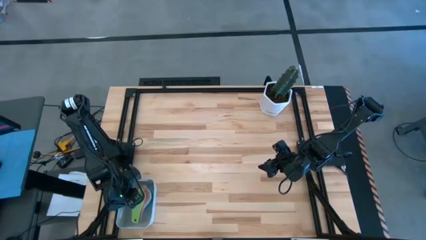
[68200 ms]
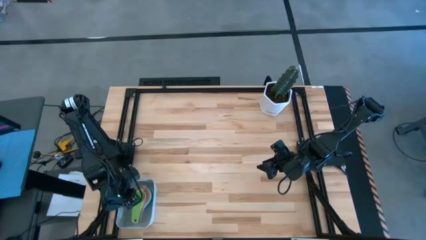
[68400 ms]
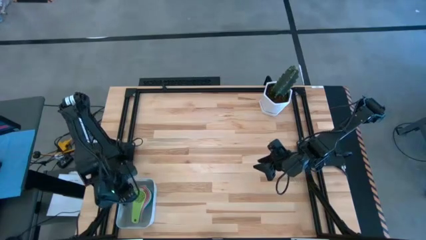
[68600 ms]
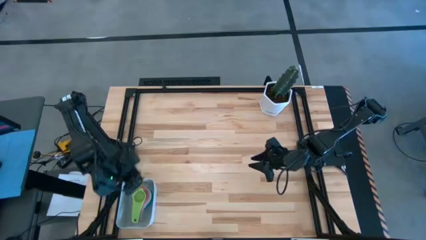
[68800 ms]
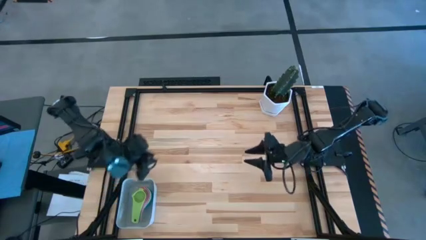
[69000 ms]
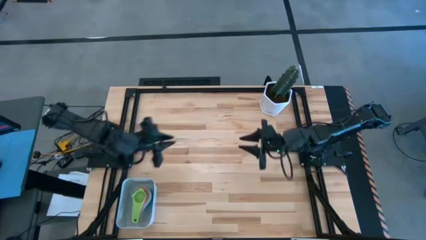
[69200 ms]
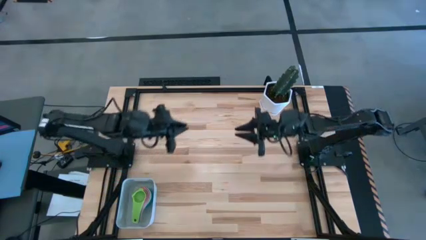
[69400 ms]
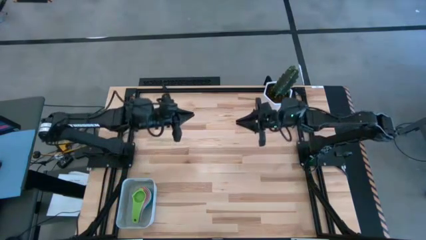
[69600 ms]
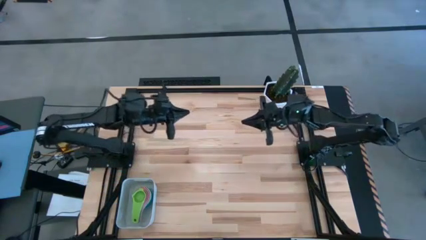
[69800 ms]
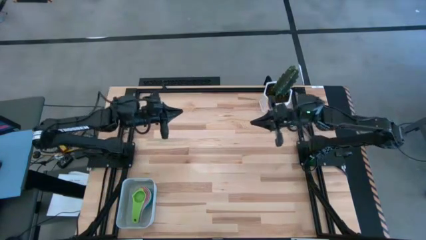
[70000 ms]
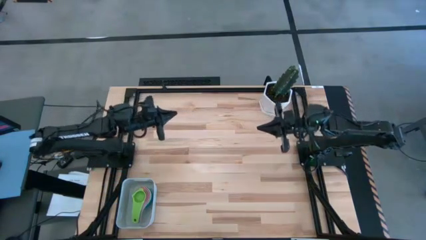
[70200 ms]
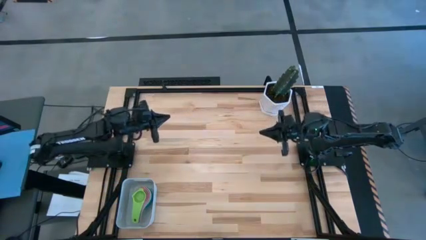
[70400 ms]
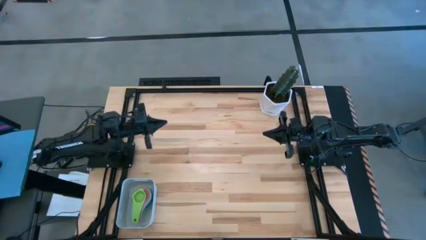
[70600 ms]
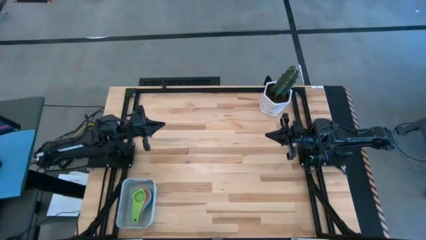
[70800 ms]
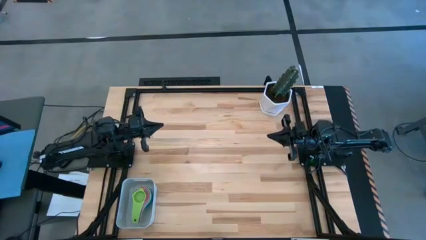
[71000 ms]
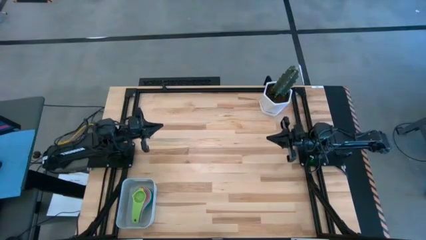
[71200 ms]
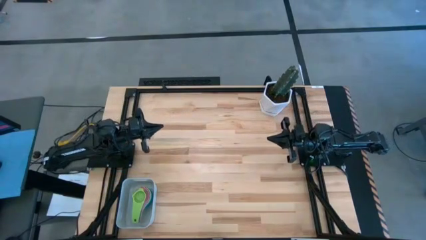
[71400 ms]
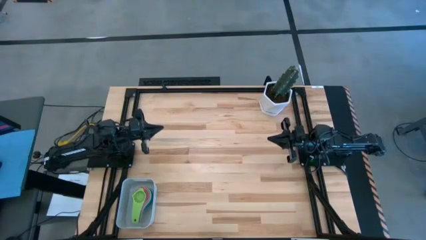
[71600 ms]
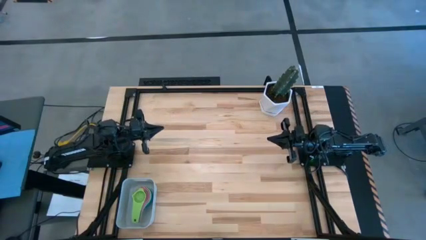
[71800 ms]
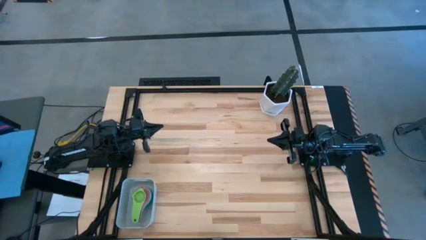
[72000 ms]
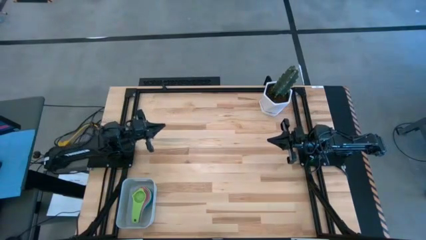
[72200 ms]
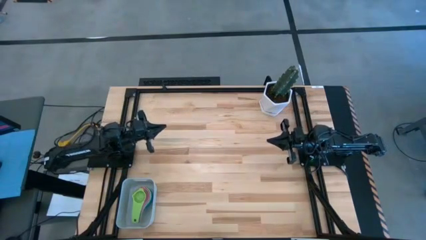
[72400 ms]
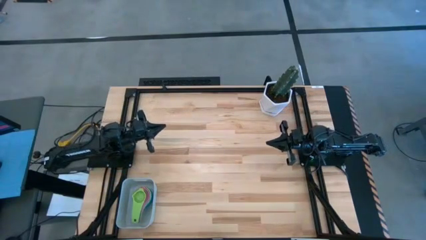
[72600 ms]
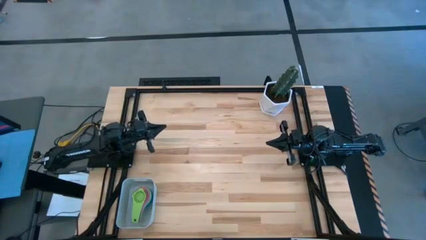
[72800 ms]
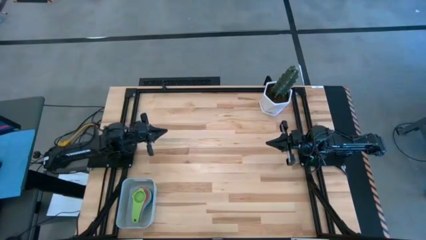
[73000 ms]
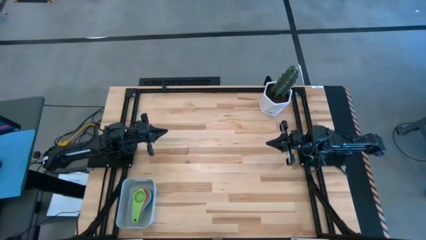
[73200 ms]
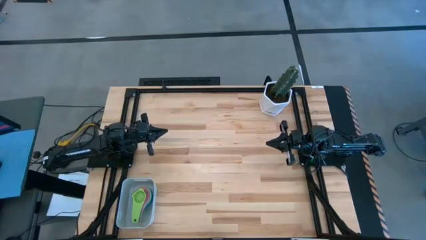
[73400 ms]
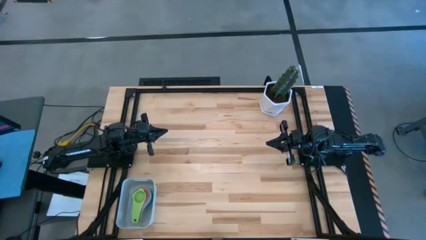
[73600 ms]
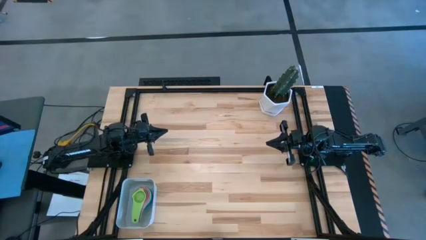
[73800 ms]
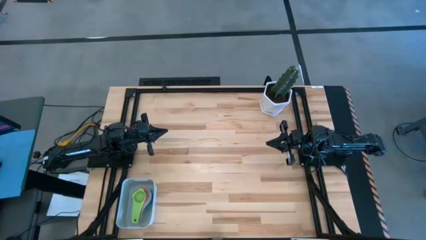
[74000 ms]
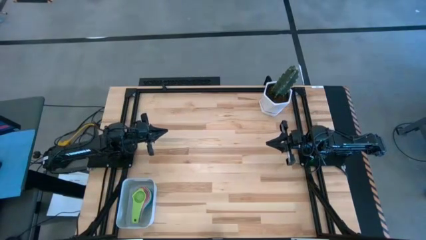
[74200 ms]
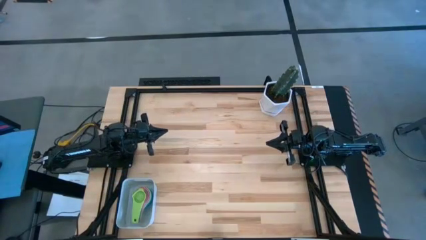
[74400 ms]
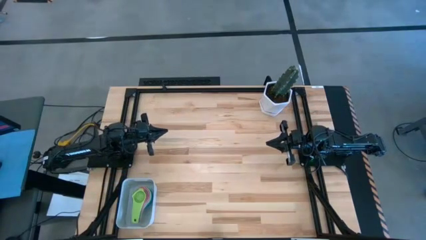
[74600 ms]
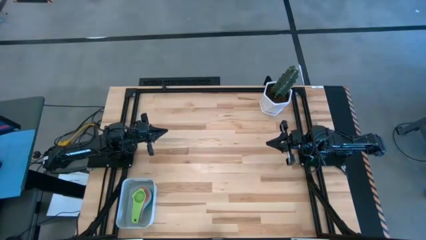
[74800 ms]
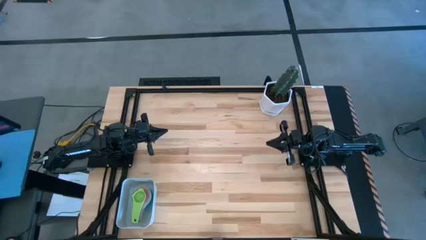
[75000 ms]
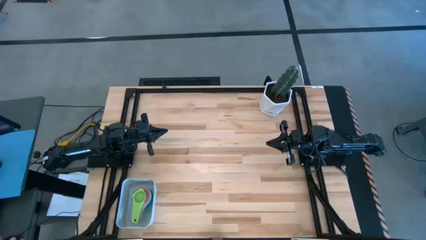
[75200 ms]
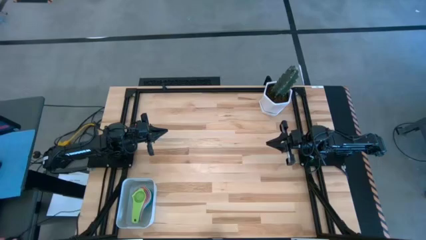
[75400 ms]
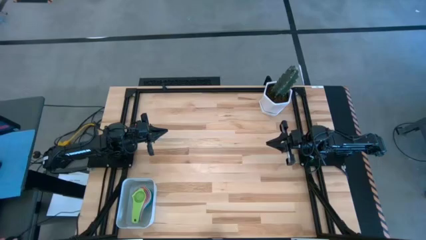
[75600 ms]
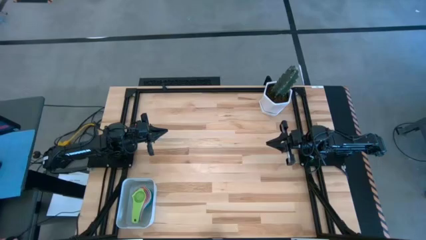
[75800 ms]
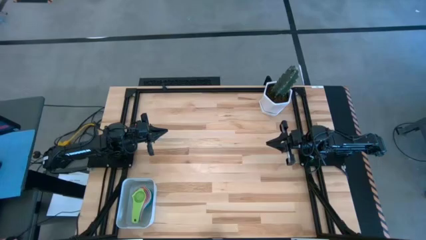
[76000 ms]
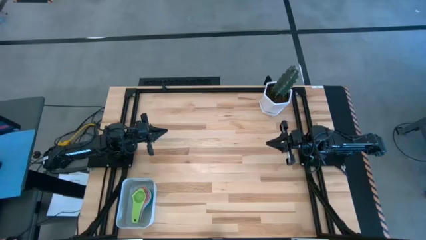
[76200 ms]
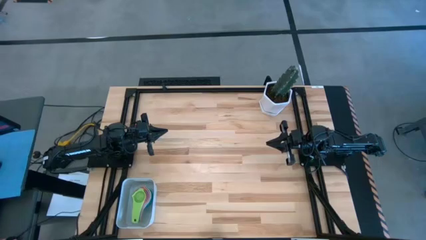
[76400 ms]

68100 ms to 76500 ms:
Task: Nest measuring cups in basket
Return to Home Position
